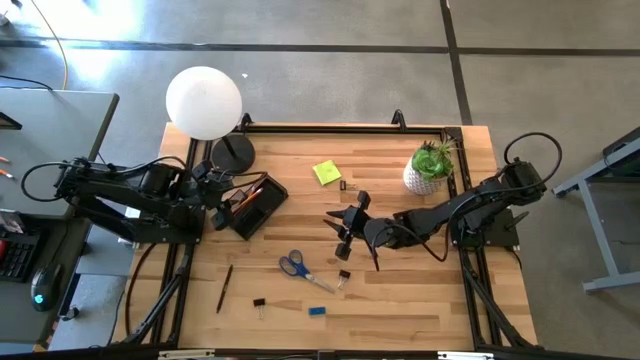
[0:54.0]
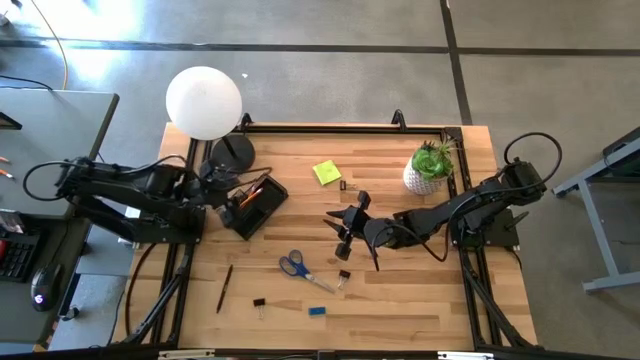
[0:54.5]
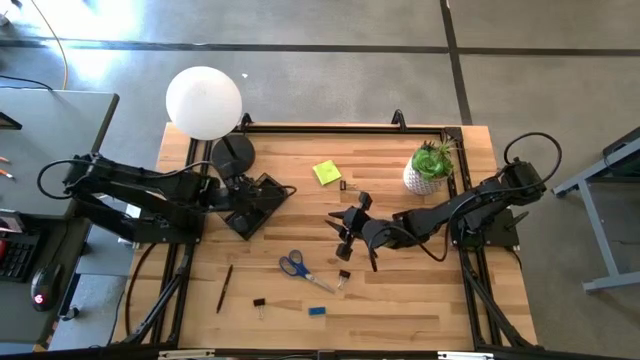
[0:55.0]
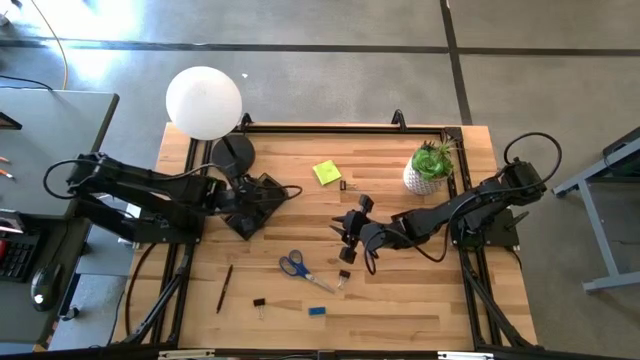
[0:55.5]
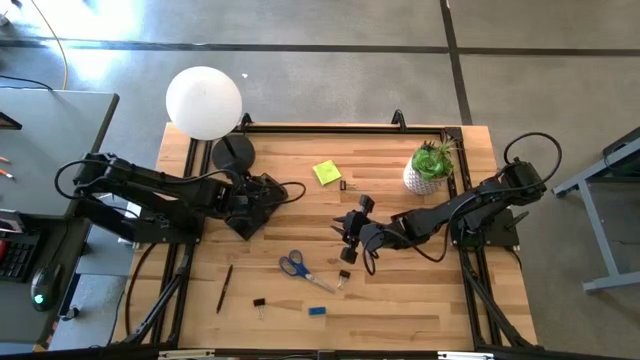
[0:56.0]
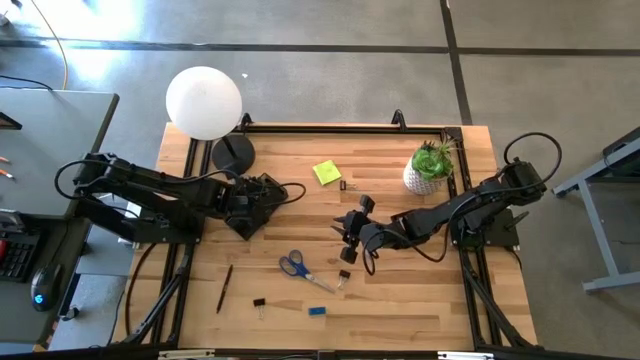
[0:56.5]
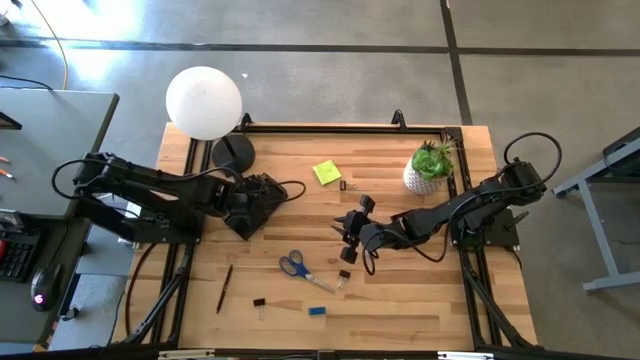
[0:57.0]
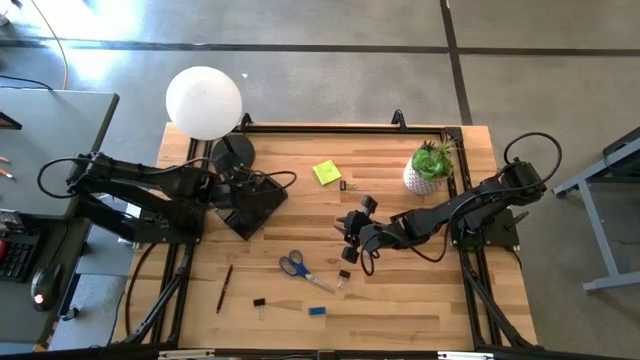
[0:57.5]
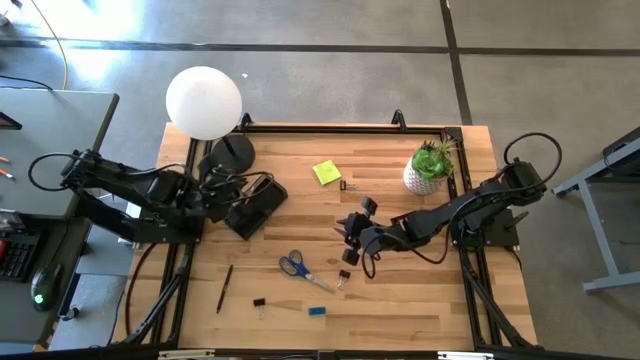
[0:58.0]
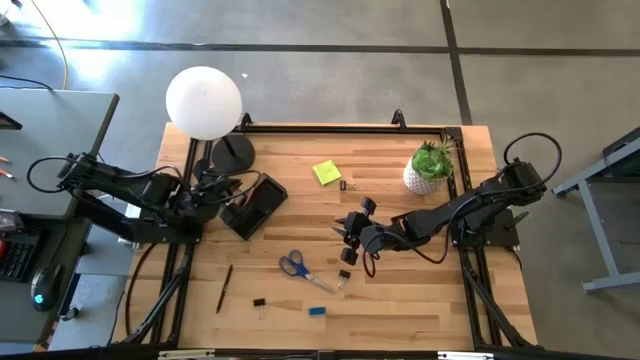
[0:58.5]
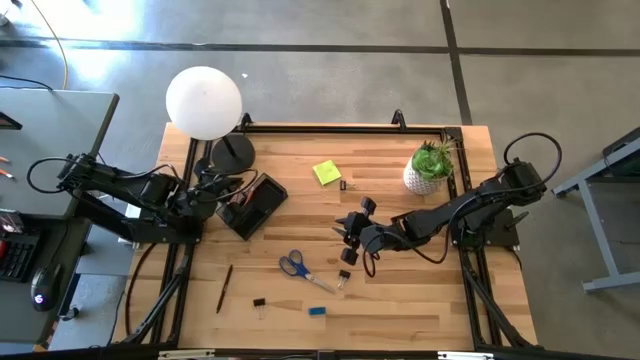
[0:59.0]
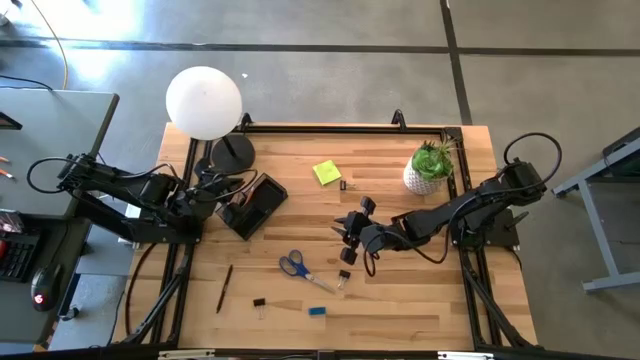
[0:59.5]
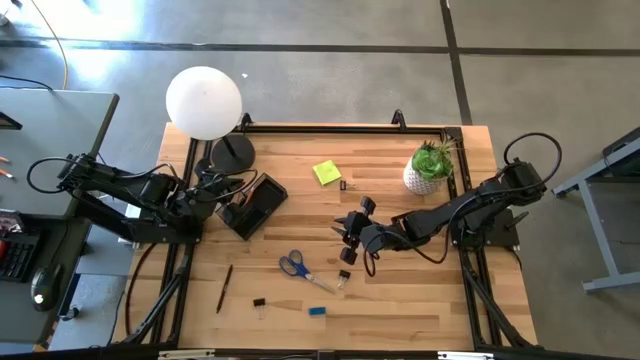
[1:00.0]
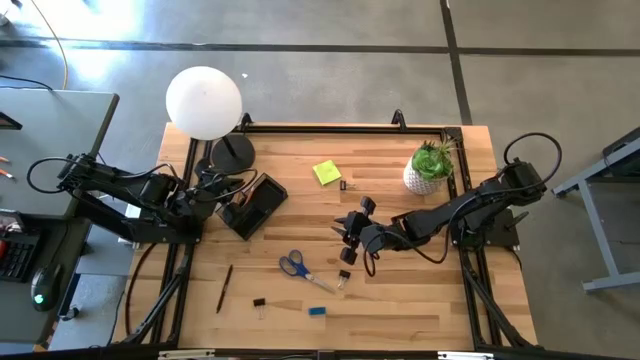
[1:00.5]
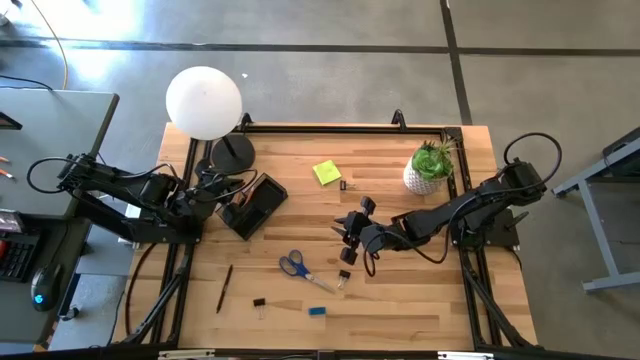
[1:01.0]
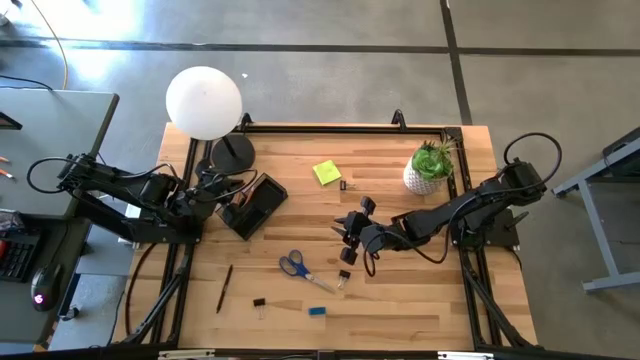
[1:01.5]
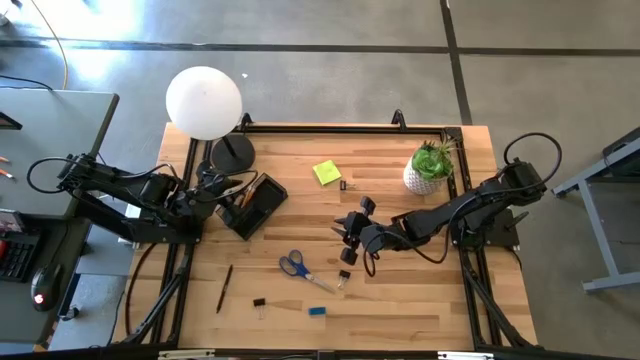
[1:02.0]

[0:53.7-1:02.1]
Task: Pick and place office supplies into organizer
Adjust the pencil in the black mesh desk organizer

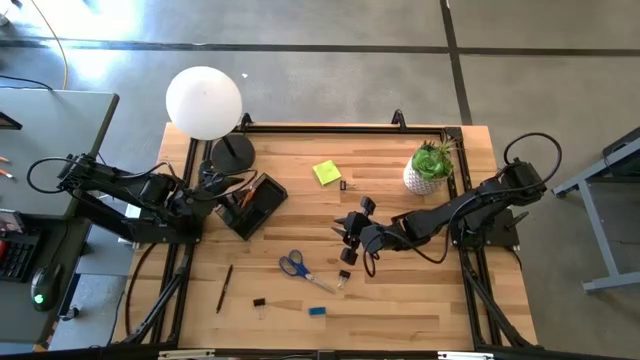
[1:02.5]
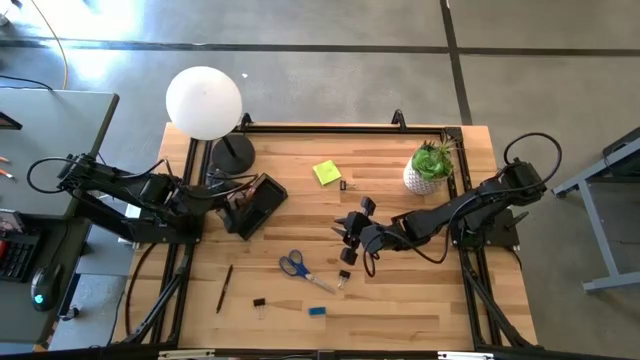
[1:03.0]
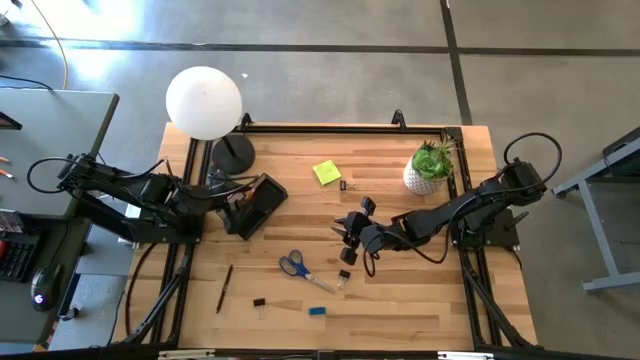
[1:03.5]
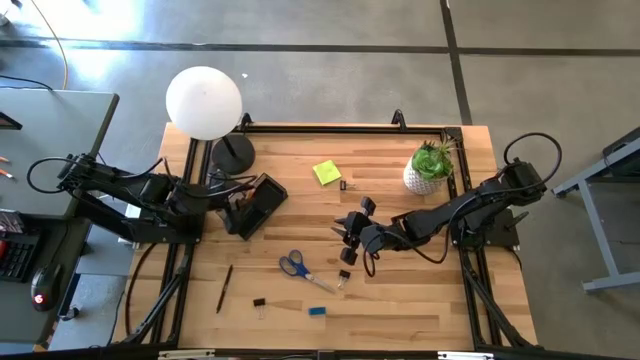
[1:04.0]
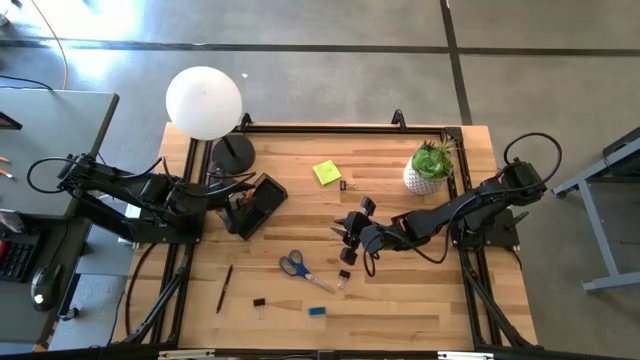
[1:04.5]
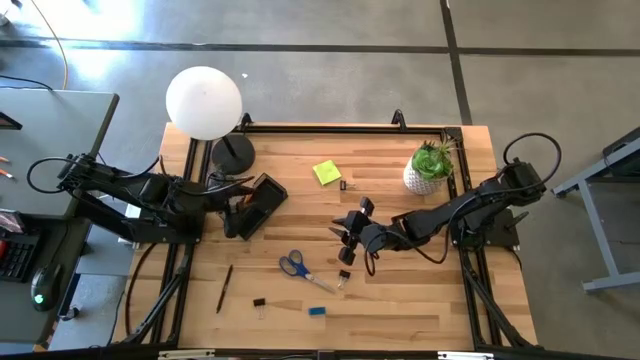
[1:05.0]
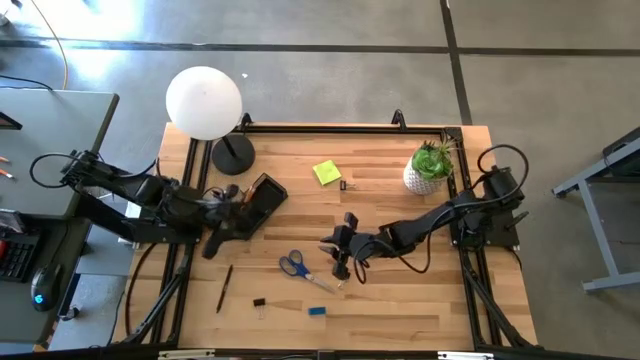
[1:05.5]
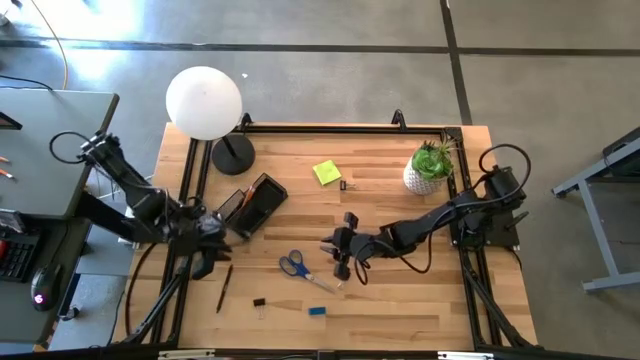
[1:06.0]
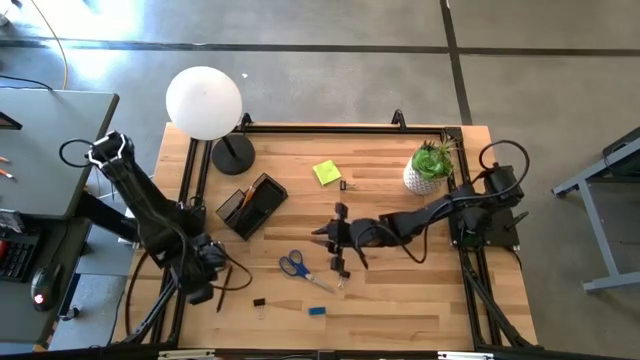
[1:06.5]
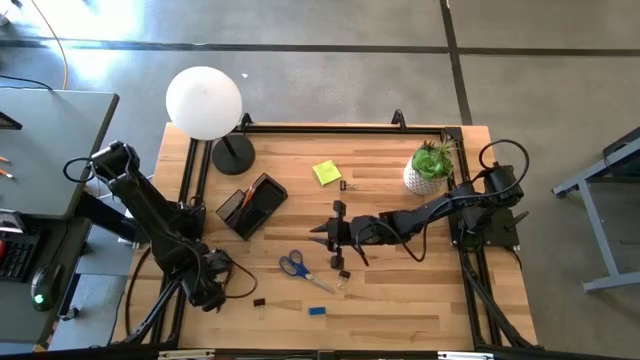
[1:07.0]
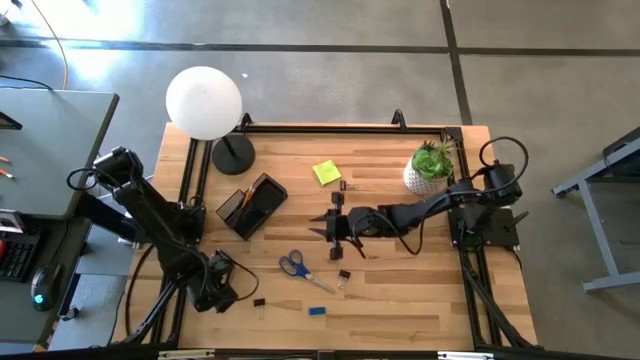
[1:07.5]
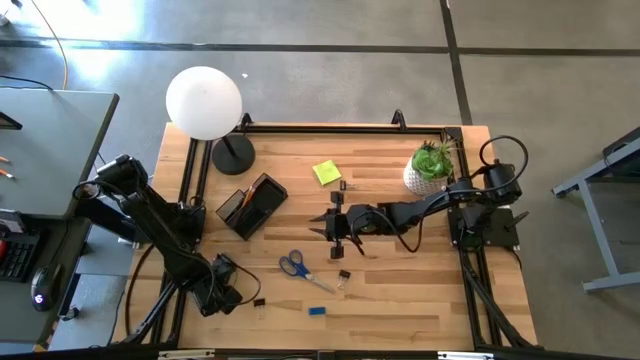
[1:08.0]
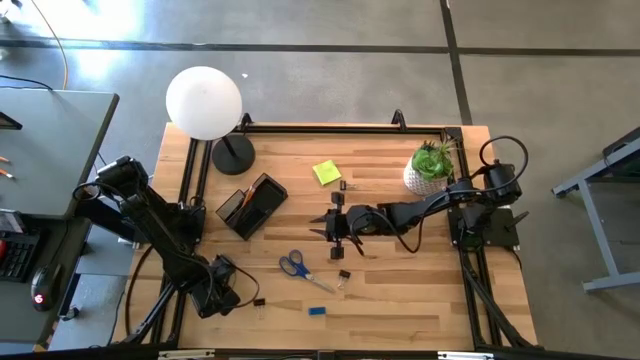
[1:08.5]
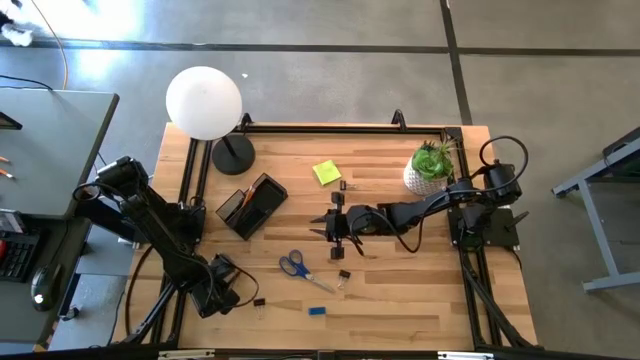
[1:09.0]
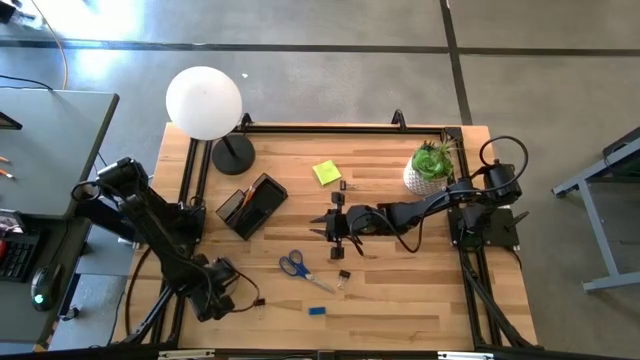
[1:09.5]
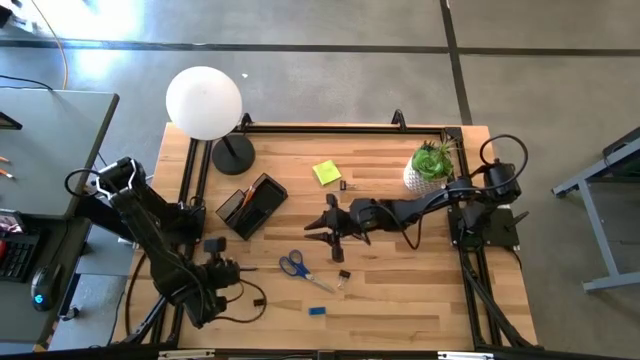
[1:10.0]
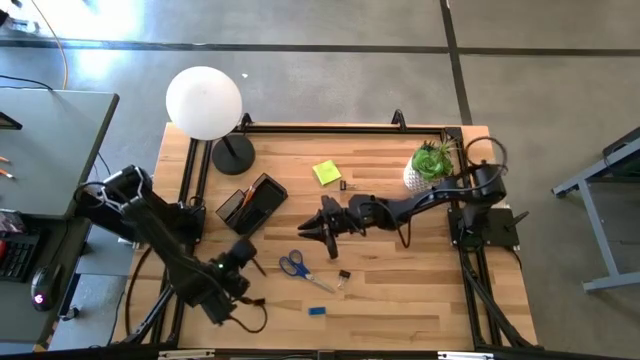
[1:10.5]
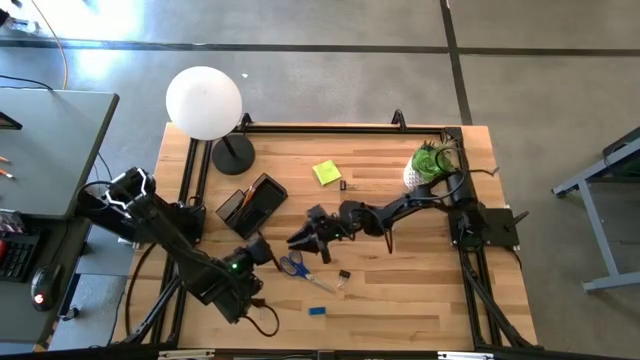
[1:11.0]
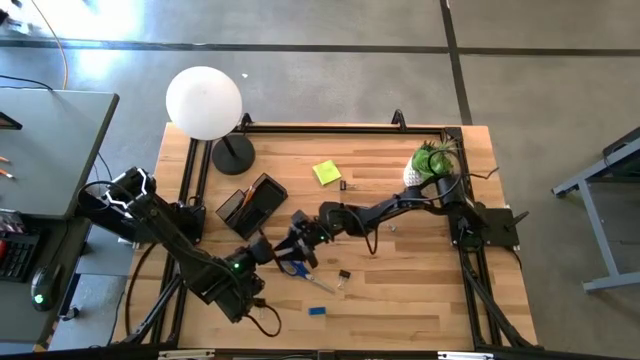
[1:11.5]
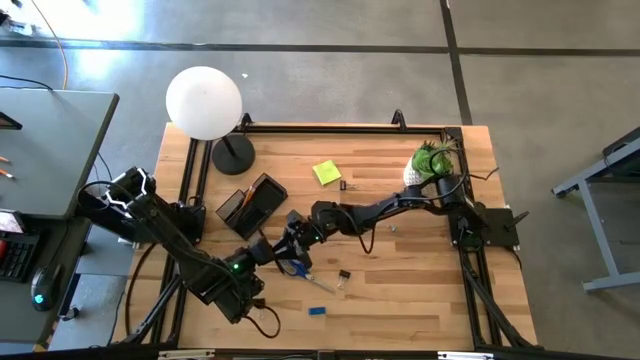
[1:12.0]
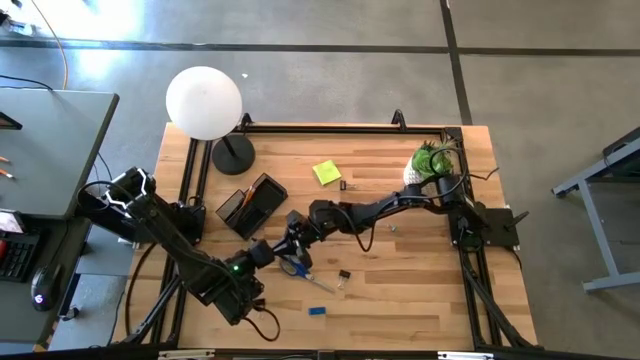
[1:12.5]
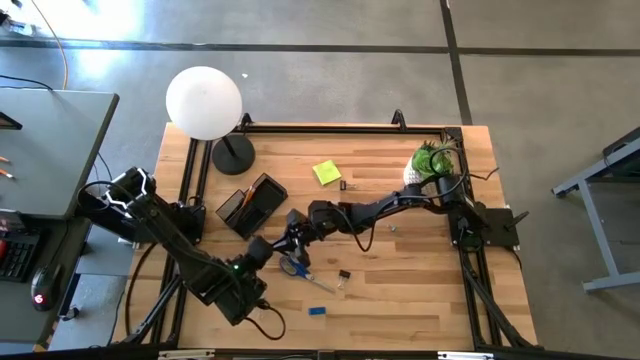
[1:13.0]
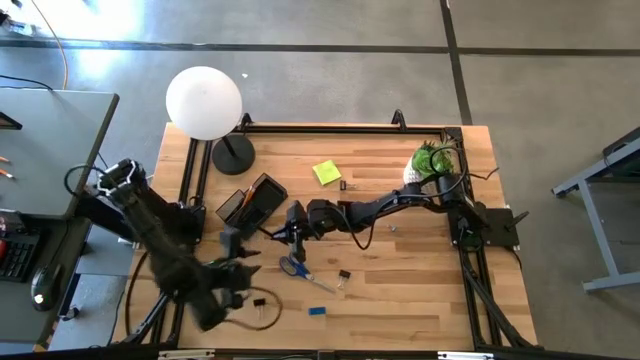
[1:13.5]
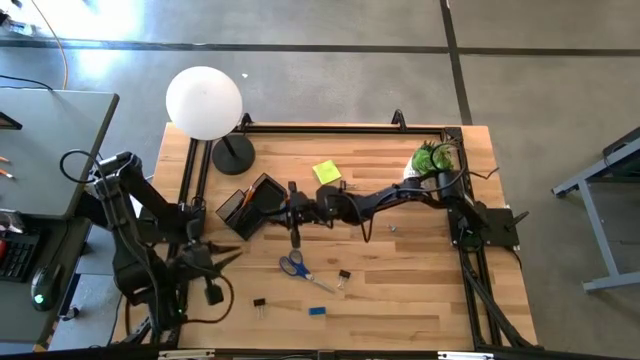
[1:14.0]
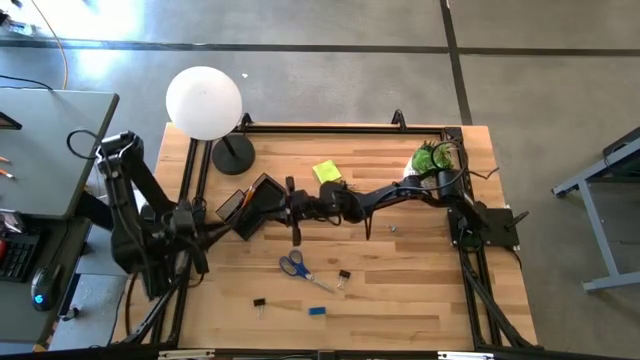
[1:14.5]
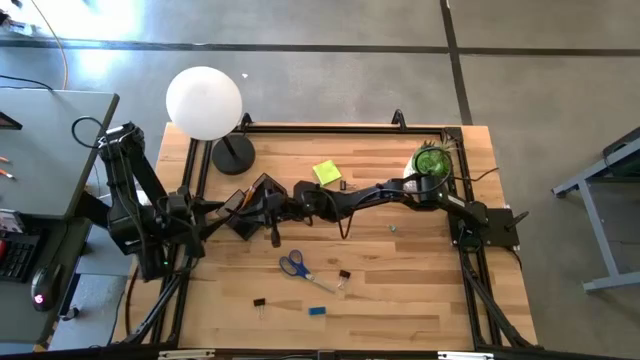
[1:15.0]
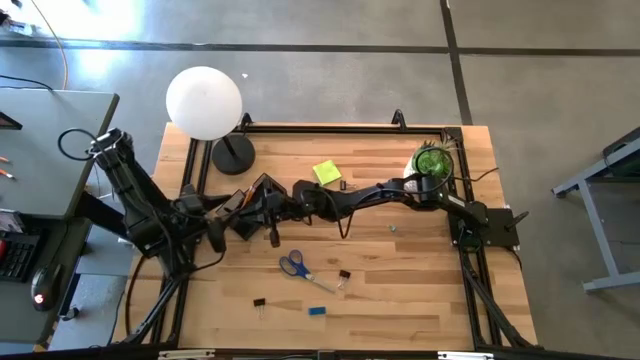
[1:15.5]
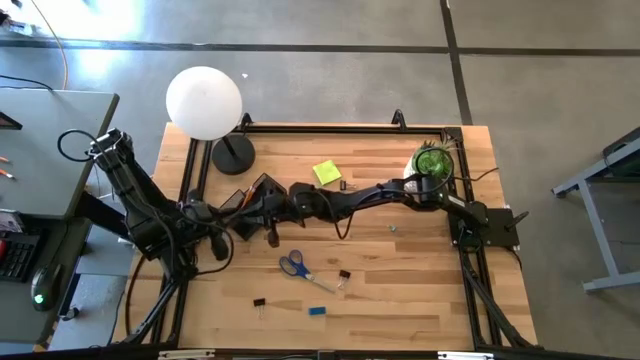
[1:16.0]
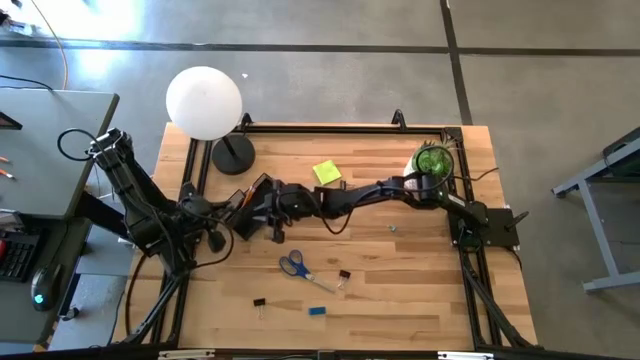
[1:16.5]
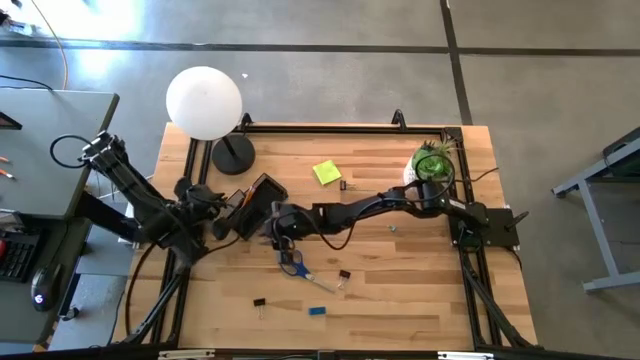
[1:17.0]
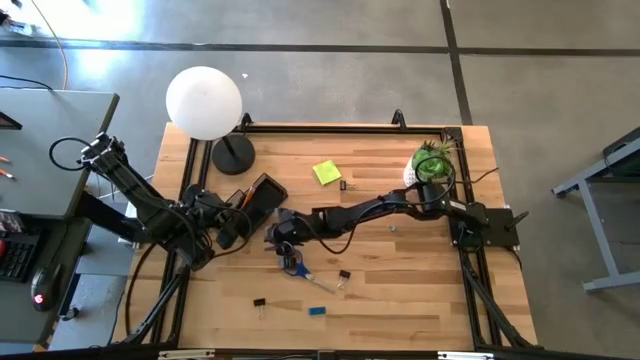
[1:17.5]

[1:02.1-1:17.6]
Put the black pen into the black mesh desk organizer
